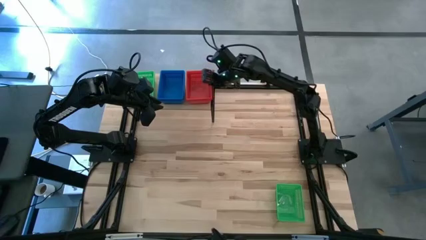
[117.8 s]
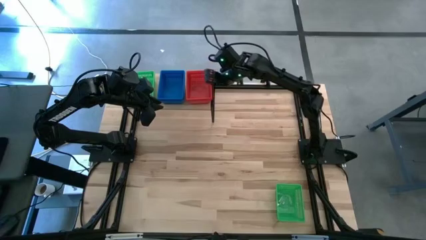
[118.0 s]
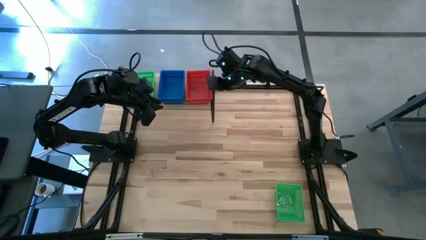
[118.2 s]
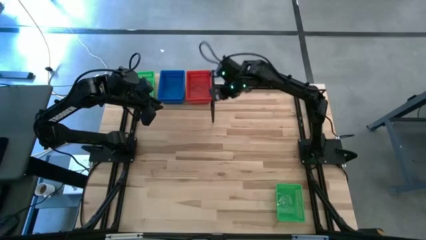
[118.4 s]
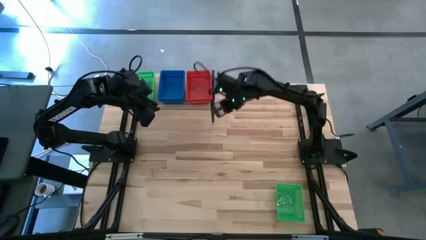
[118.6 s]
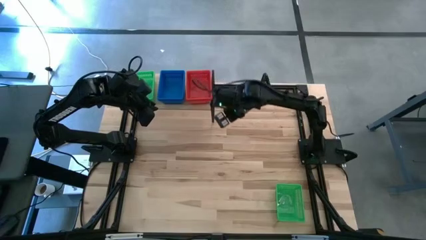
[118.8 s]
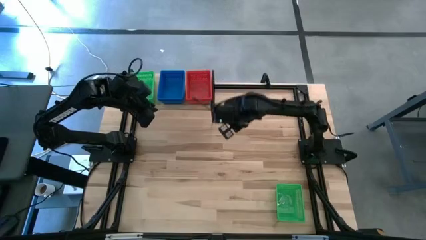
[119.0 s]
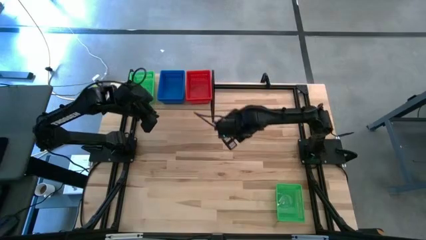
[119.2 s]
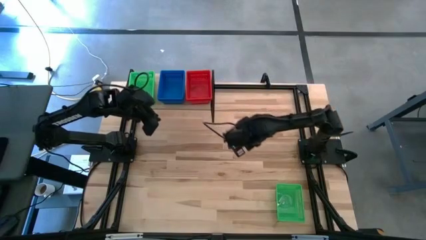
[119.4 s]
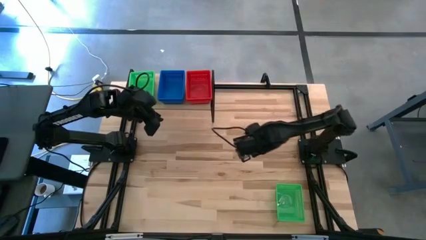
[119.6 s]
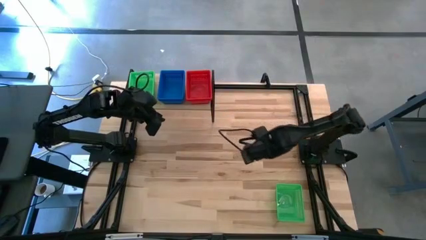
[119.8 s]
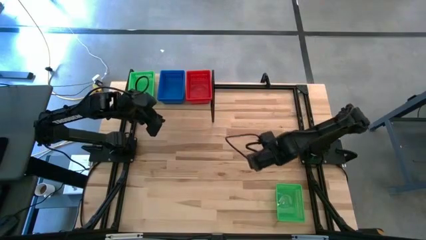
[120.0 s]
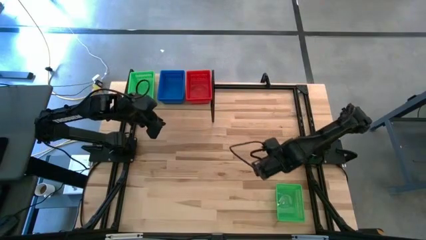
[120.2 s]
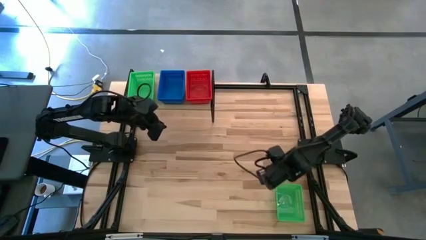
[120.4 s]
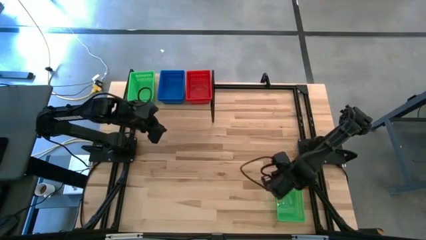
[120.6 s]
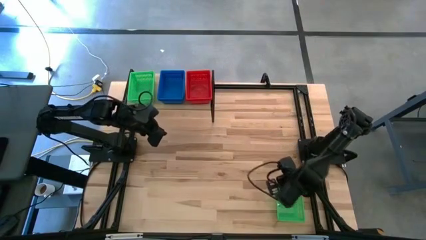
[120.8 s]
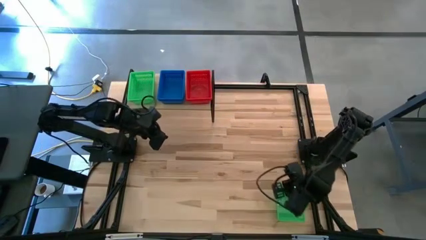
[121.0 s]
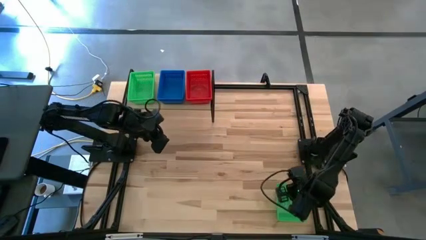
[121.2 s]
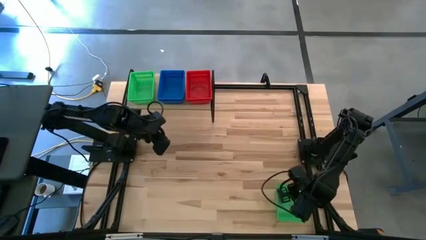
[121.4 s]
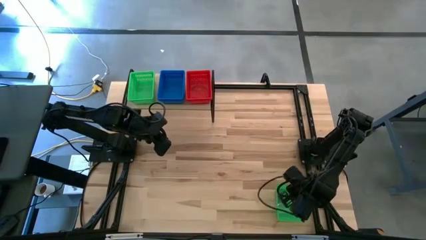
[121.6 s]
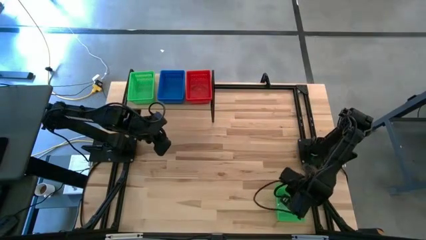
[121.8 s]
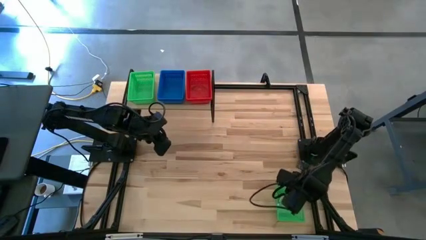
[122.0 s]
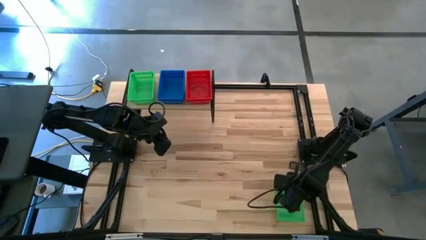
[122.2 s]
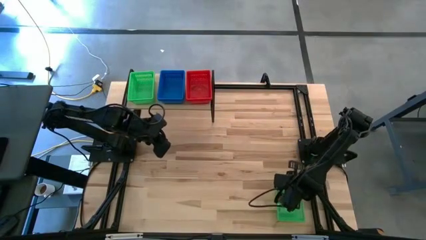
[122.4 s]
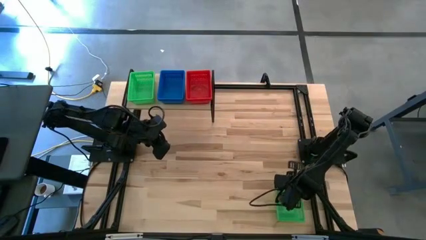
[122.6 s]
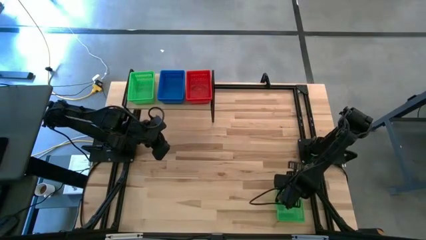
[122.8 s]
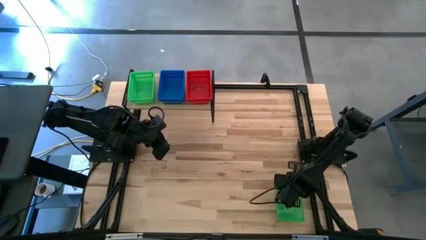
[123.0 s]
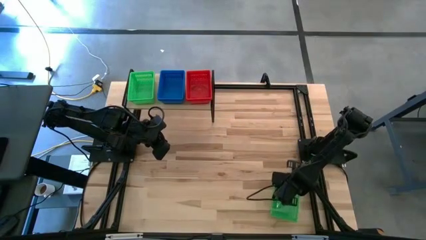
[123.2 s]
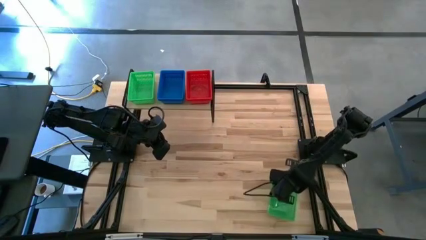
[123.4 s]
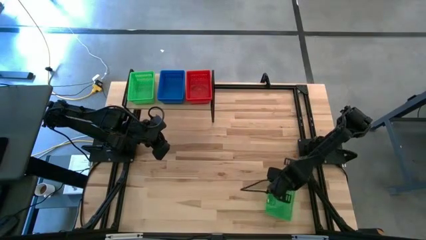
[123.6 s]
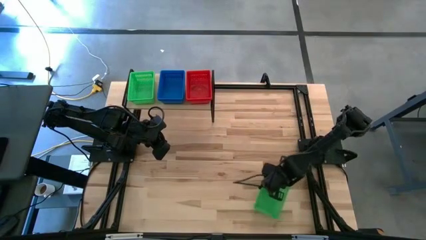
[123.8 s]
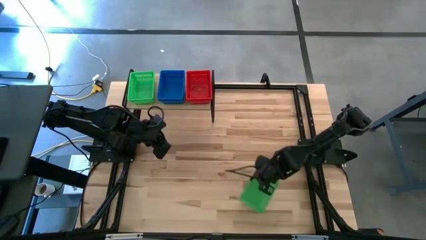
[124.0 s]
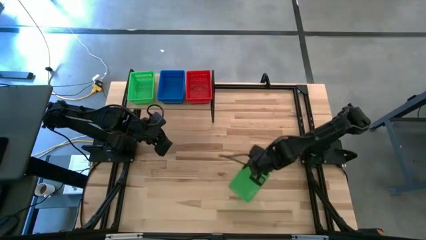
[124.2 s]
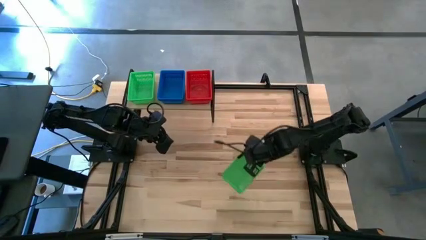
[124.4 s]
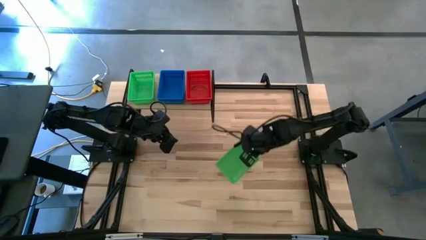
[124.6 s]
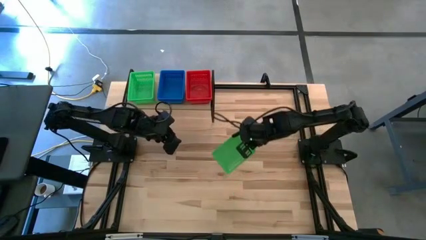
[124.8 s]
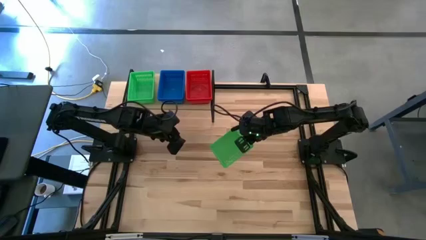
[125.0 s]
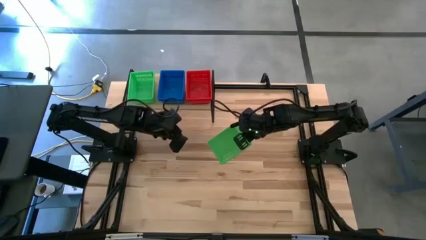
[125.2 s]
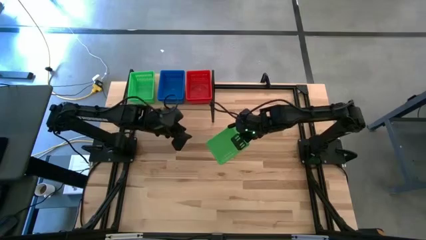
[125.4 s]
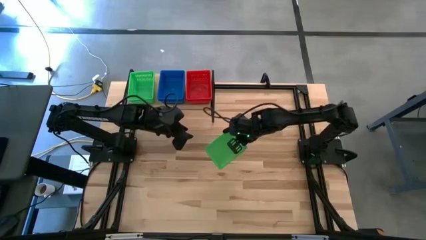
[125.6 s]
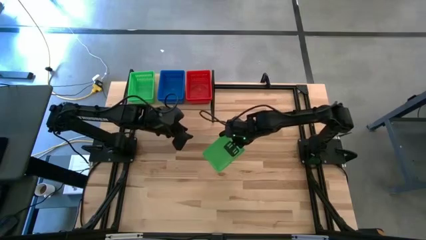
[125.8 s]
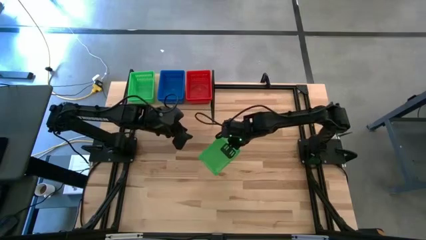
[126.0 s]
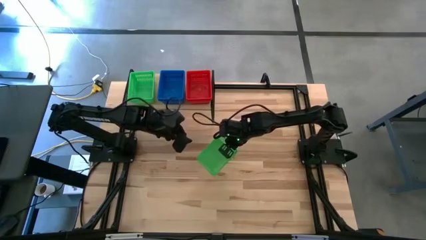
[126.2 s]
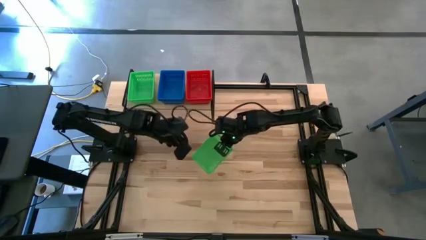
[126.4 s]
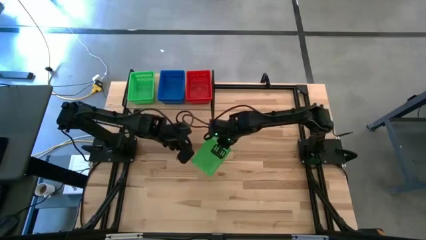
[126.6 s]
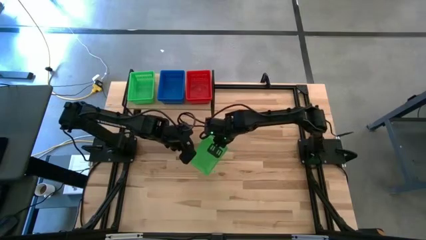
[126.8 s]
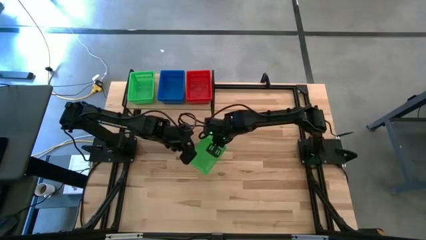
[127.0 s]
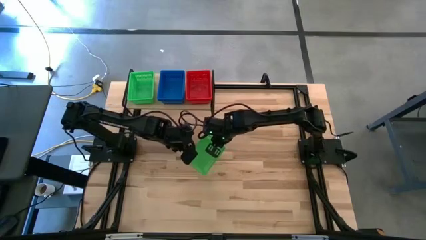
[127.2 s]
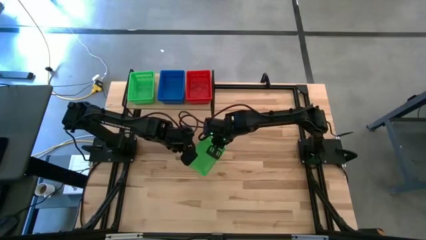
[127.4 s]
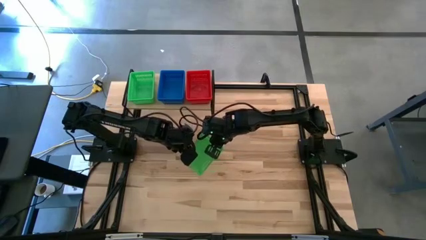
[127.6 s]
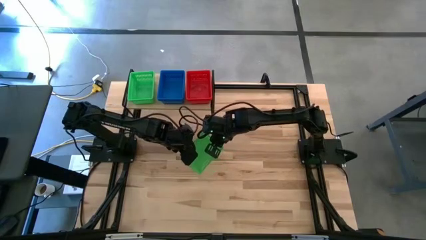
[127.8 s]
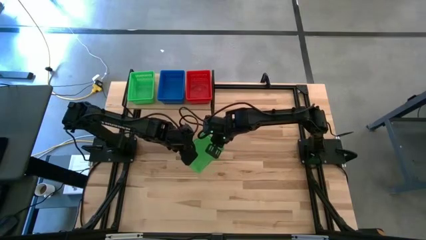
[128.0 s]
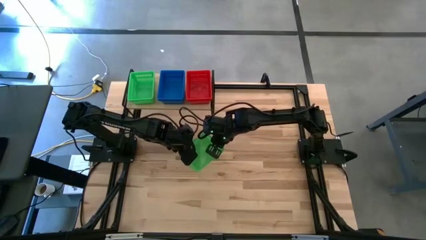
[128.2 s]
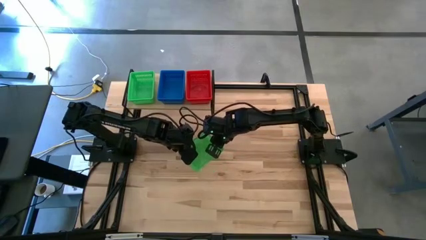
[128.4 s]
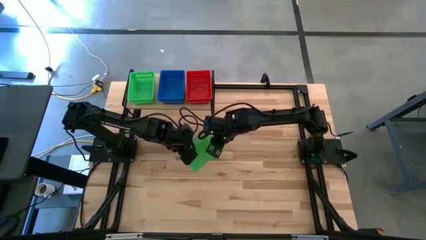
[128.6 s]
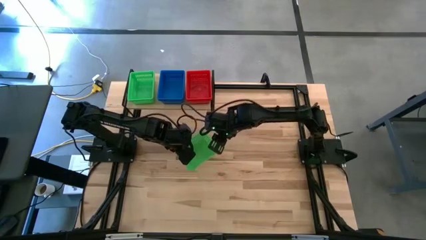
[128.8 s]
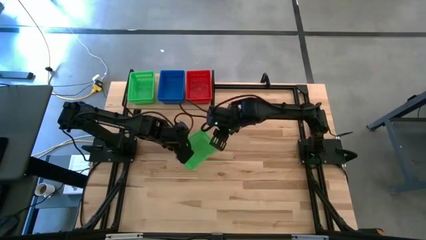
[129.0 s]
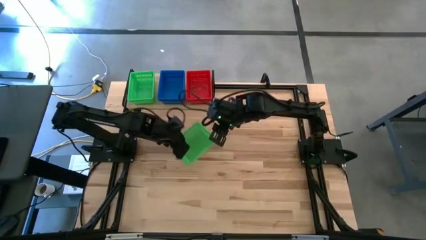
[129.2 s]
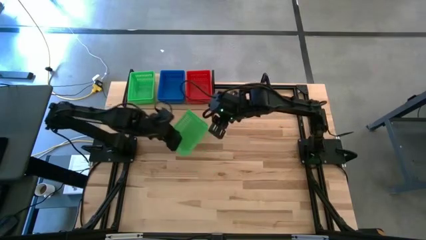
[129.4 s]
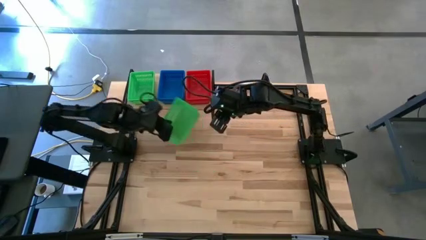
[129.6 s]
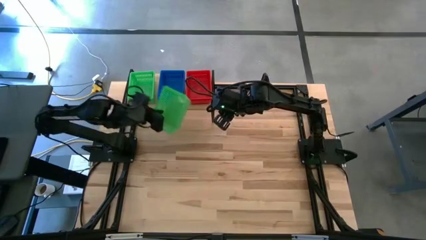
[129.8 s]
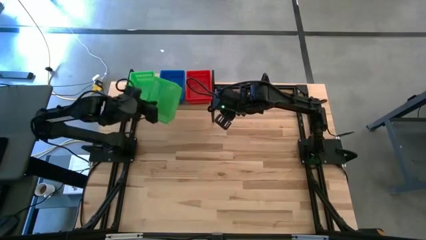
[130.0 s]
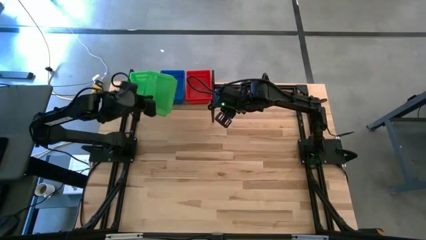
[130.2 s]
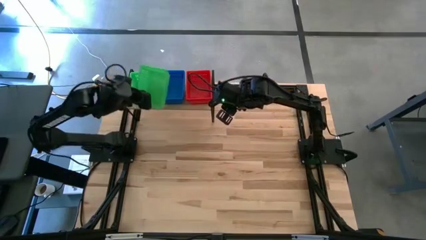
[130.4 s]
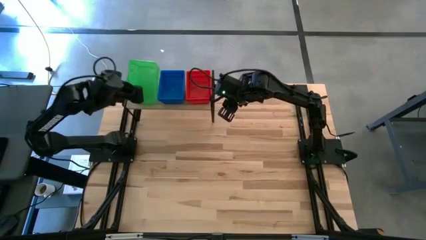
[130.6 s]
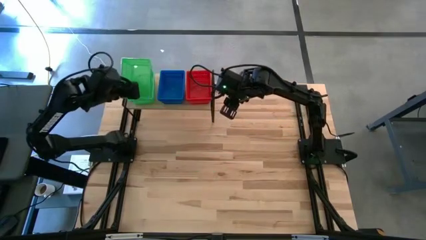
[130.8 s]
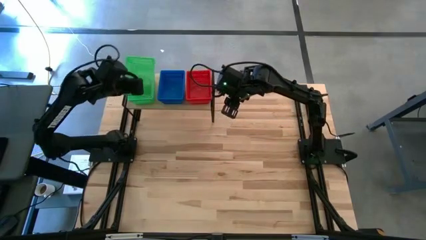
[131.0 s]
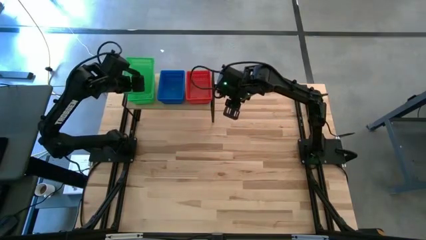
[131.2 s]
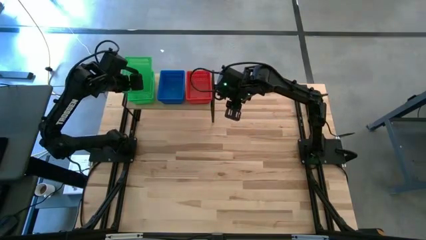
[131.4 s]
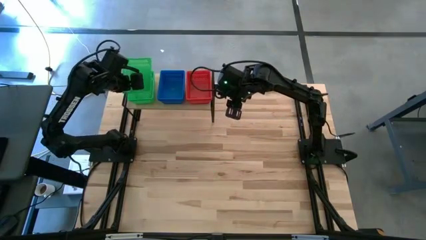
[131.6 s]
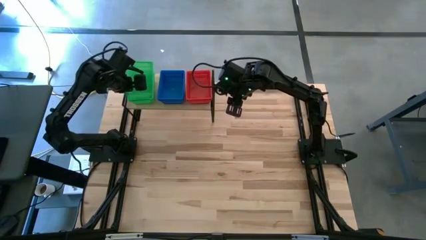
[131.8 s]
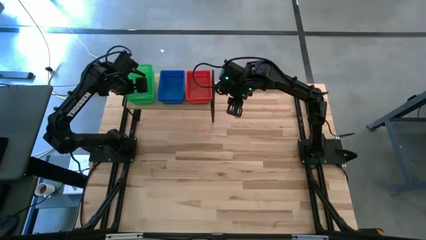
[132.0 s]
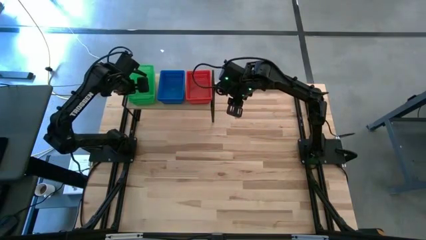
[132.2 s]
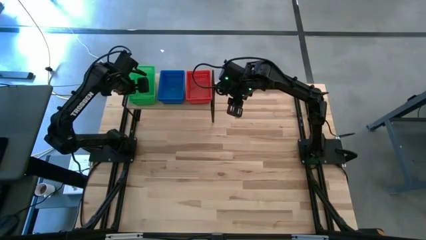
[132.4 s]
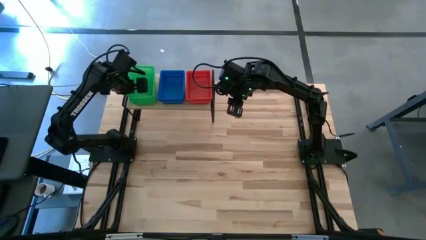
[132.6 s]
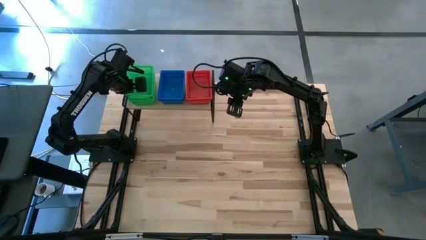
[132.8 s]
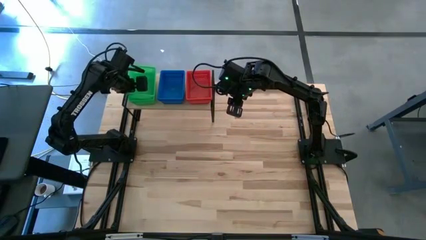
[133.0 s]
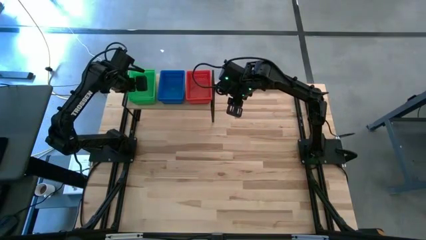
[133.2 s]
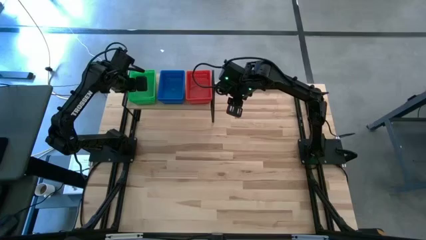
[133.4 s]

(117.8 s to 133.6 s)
Task: Stack baskets on shelf by color
Stack the green bin on top of the green bin on the shelf

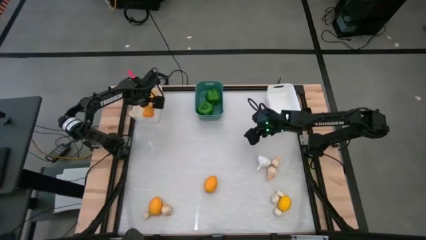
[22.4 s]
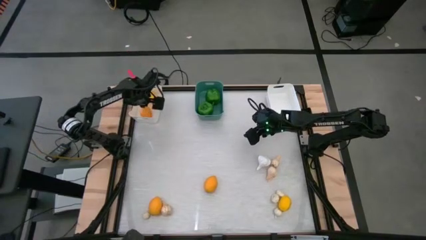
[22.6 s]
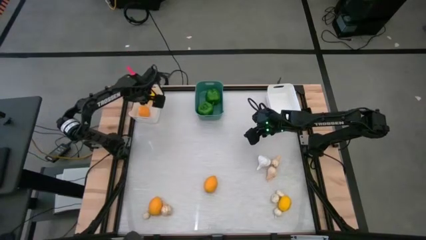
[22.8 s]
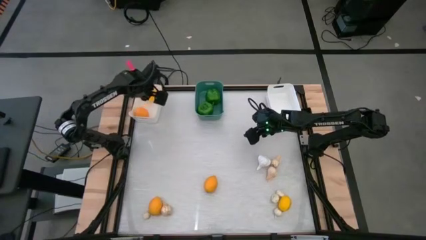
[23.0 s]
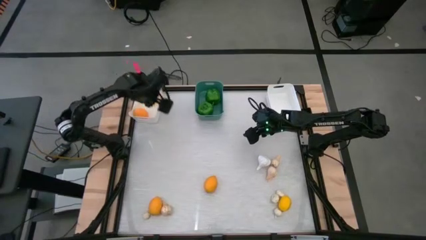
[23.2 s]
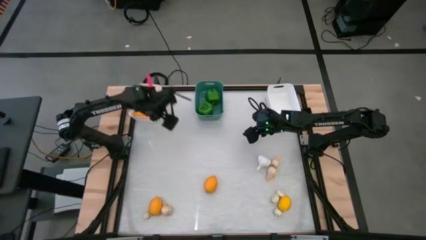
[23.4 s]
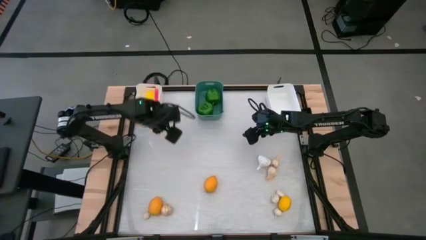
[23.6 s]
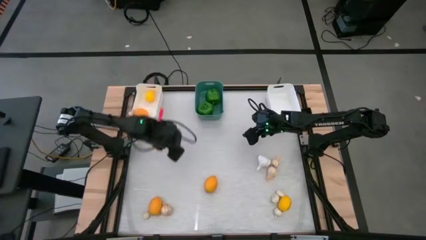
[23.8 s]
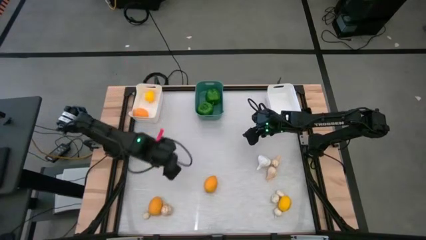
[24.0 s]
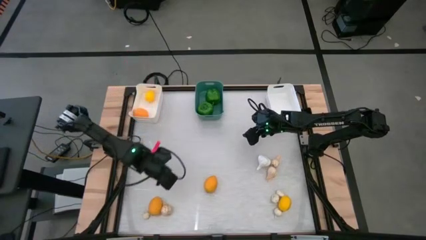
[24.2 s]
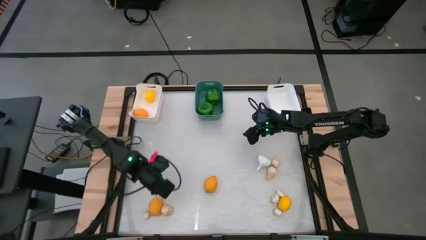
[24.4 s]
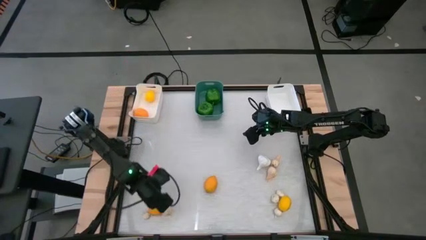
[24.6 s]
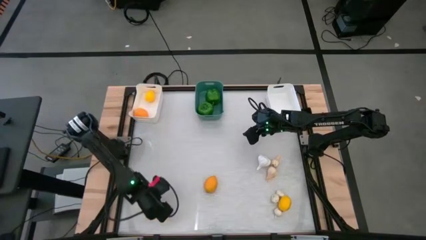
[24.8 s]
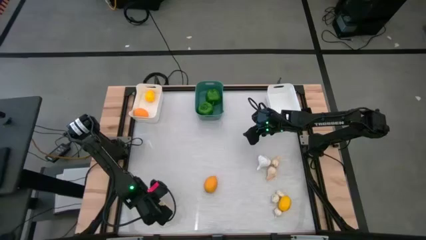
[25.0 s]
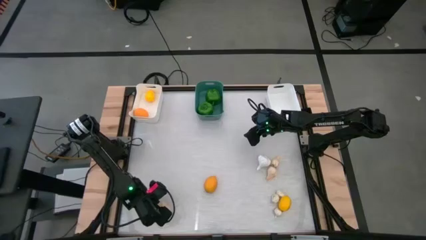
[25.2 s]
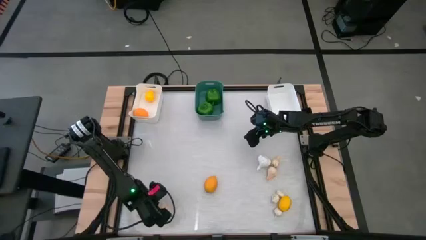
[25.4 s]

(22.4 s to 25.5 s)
Task: Sort produce into baskets
Put the bottom left yellow lemon into the left white bin
